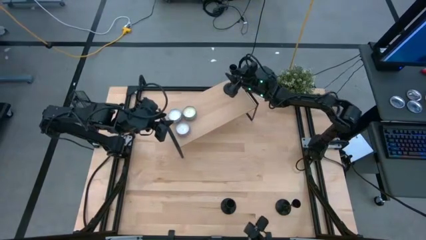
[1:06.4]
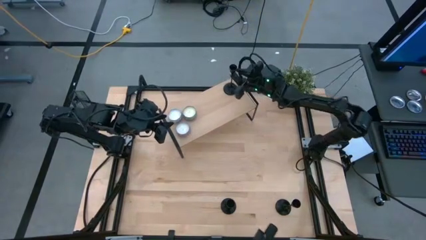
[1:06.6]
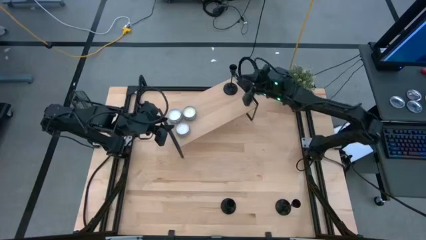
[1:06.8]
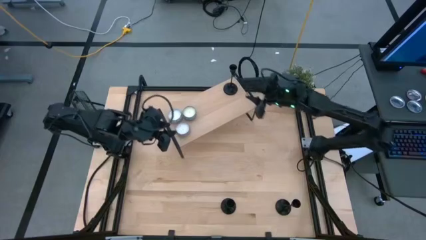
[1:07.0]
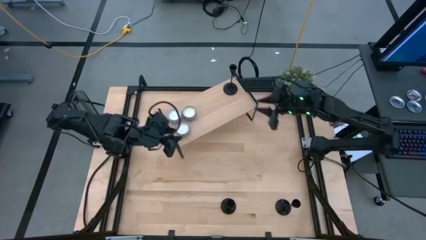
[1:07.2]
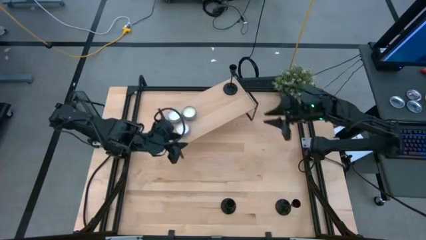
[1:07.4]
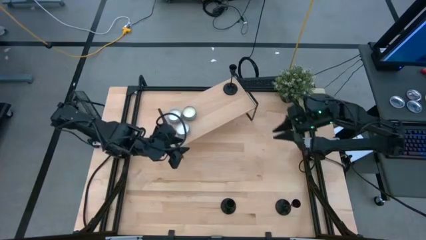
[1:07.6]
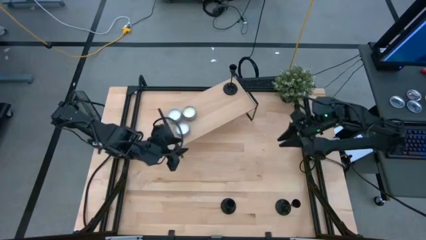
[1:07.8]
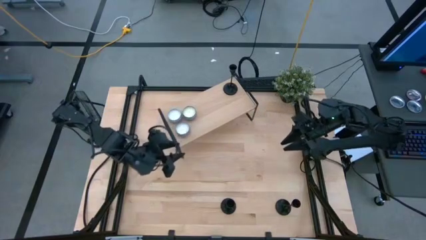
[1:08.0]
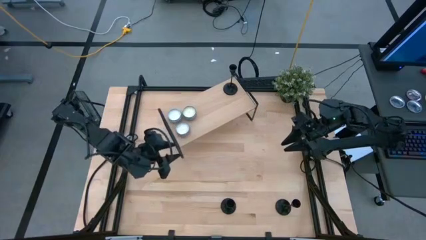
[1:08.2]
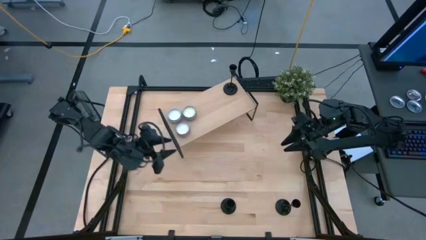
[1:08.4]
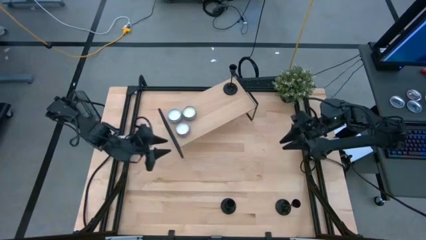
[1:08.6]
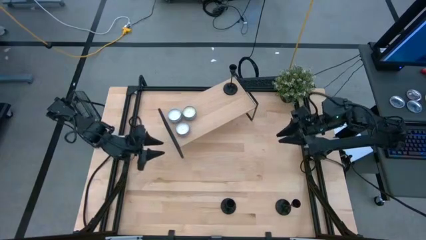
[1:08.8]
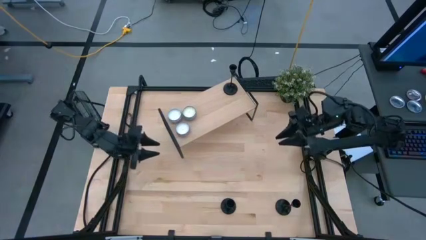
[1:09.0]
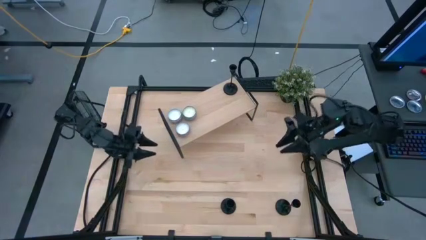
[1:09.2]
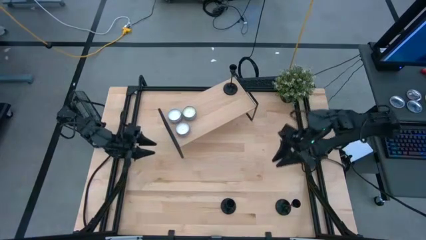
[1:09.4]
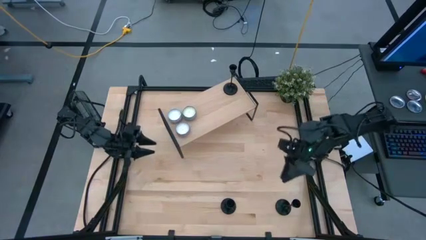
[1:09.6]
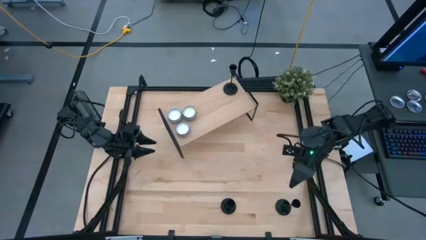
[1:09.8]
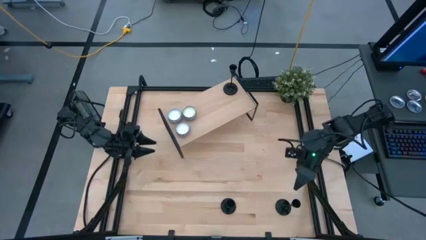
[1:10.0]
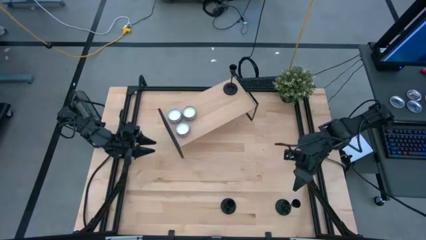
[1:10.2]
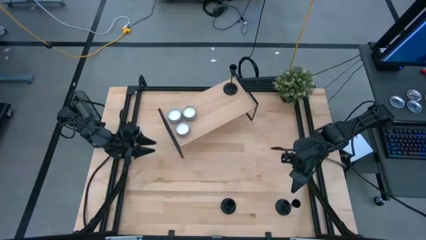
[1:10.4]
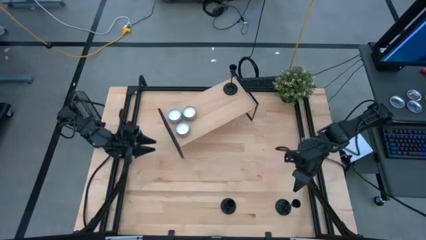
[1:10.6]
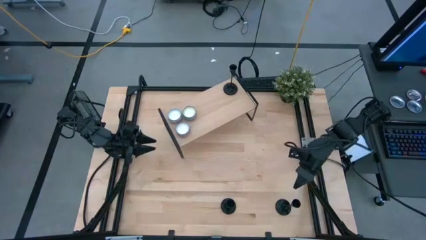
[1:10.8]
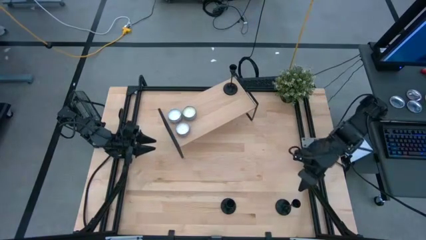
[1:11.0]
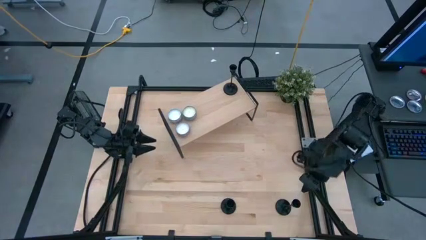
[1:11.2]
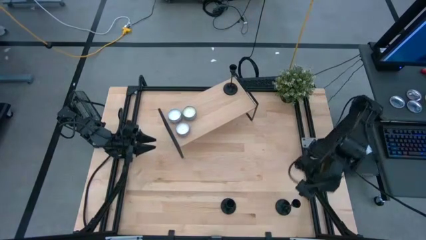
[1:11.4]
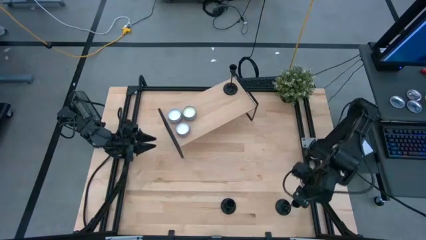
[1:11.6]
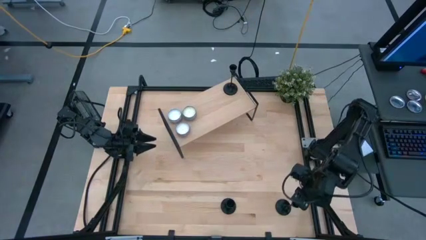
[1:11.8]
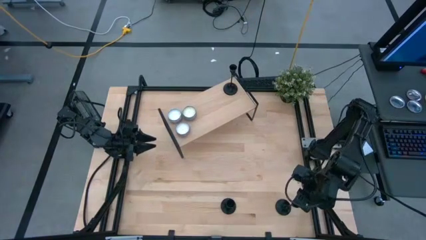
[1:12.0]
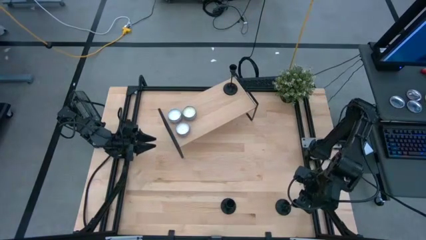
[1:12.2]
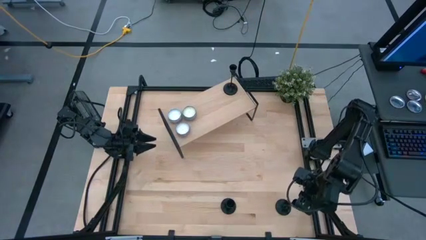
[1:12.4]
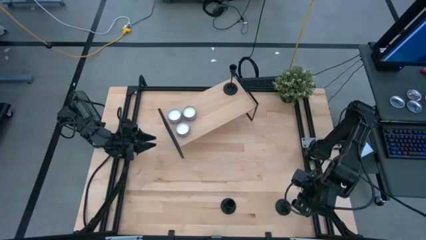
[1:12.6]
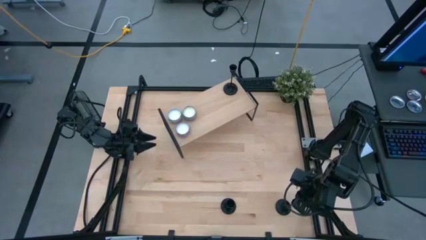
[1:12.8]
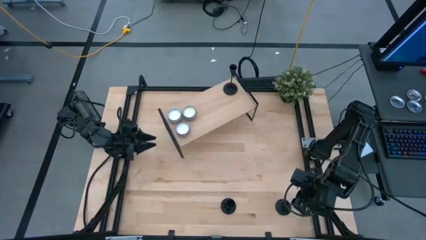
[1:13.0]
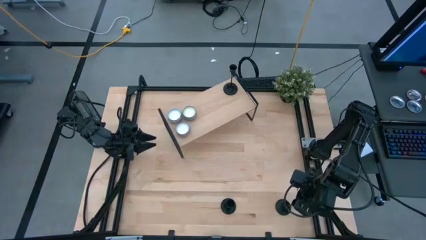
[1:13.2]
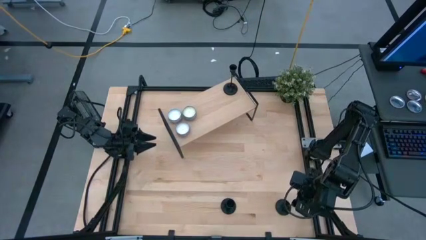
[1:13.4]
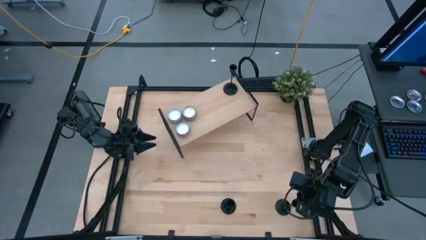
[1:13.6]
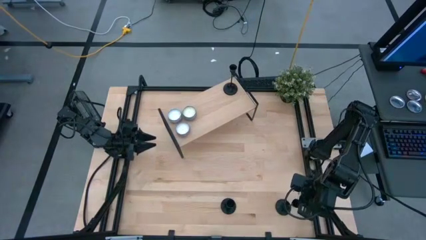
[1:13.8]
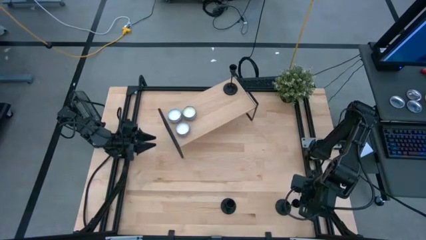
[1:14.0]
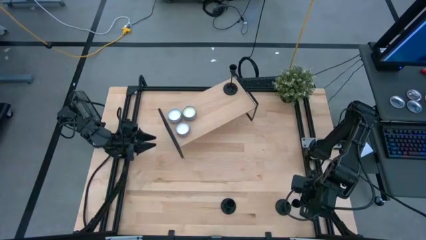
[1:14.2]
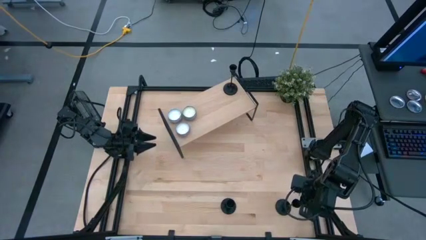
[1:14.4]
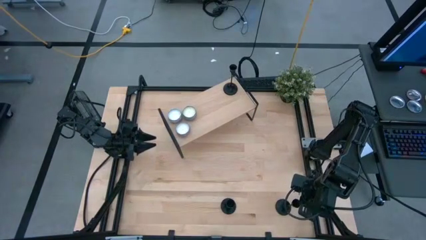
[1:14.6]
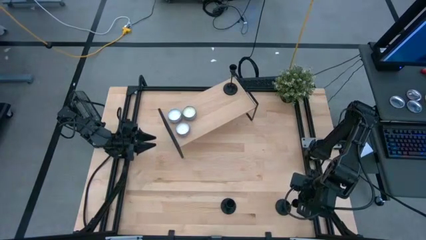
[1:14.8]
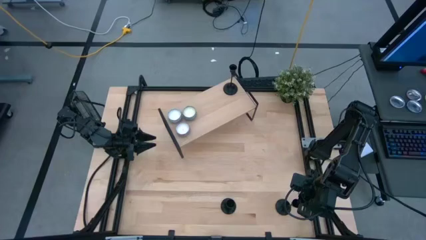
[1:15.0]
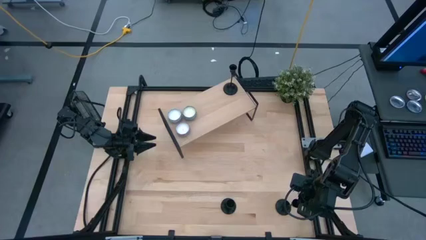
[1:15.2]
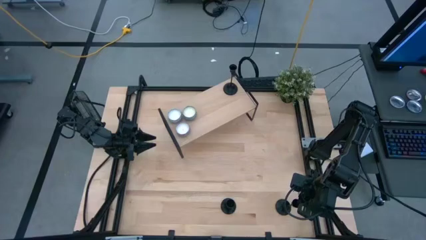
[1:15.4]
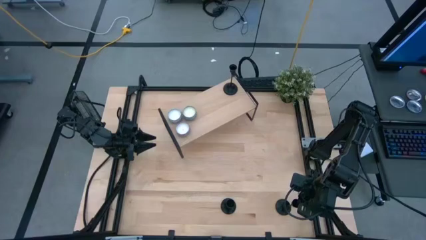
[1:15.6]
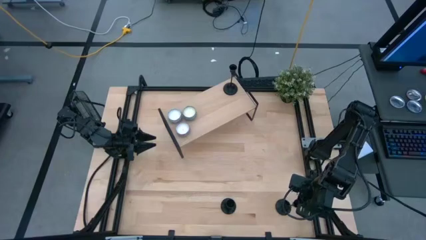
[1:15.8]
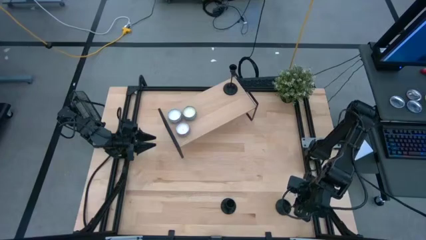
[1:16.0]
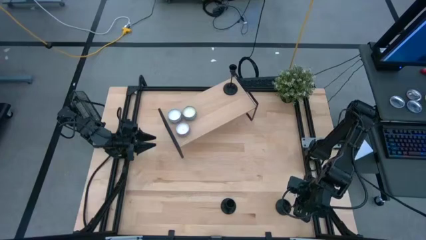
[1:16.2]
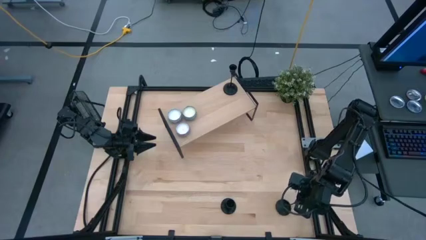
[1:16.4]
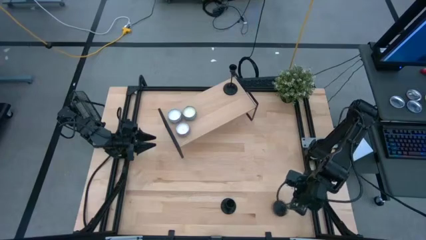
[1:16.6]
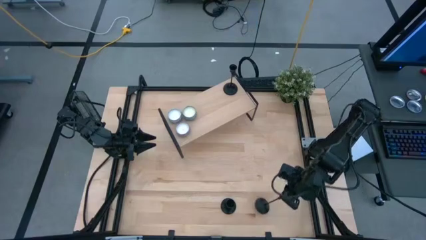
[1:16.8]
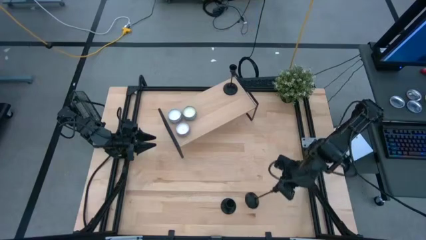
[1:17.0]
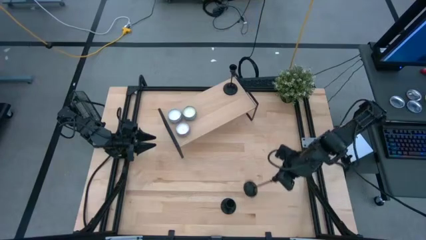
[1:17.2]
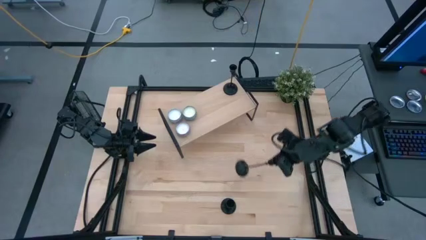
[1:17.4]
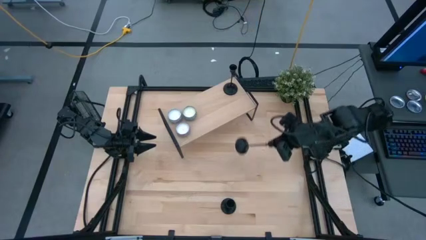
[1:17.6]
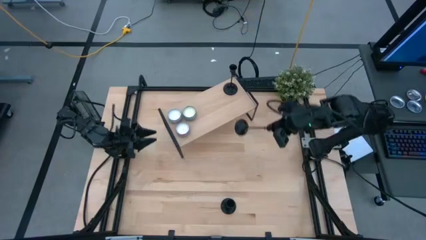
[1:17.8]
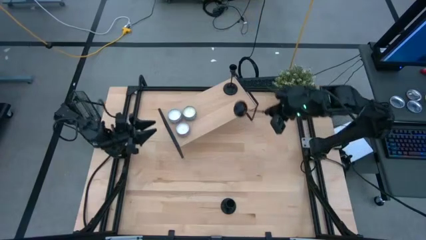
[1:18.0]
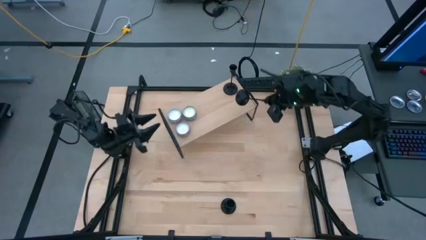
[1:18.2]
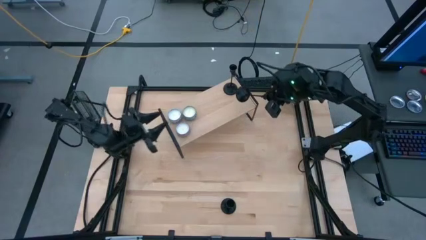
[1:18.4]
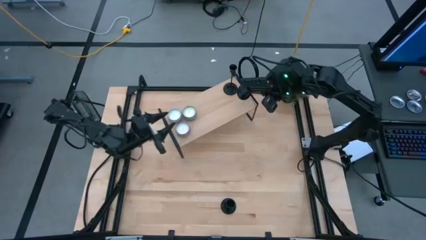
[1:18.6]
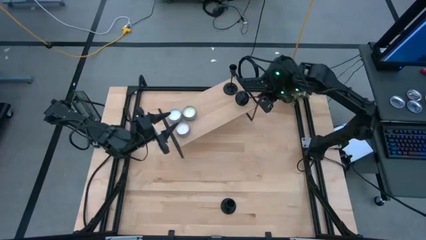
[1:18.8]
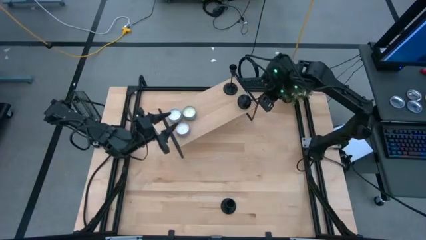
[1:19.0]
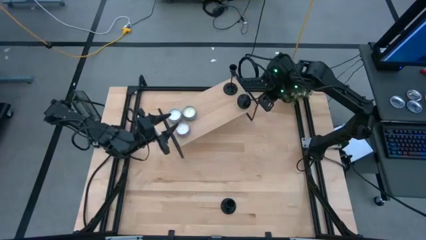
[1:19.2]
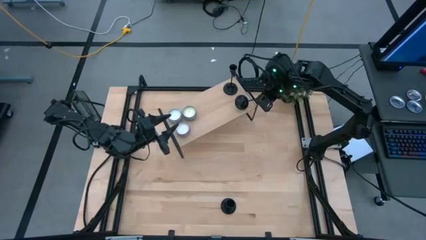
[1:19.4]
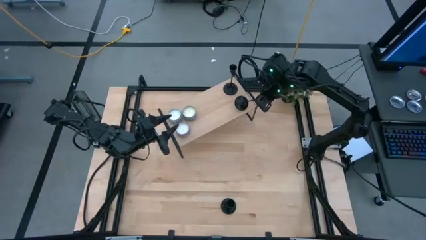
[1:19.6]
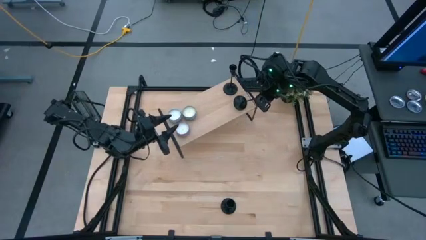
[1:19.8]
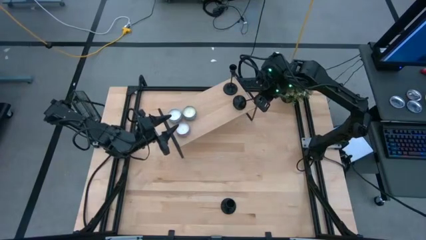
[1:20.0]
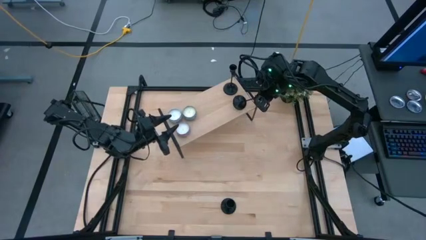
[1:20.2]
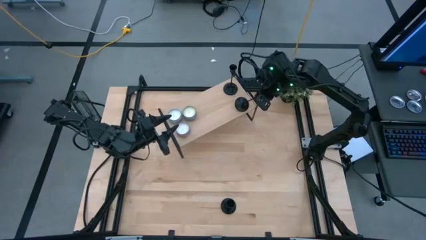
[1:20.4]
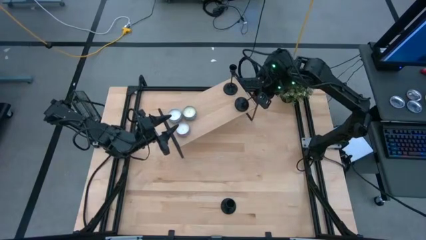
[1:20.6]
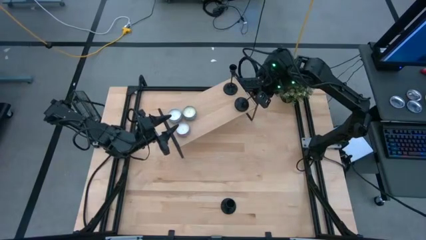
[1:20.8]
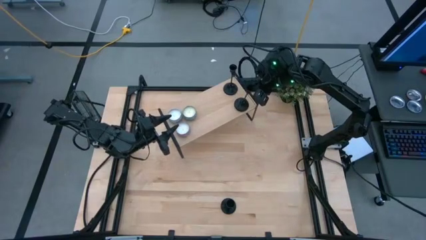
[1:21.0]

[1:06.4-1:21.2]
Task: Pick & Place candle stick holders
Put the right black candle holder on the shelf

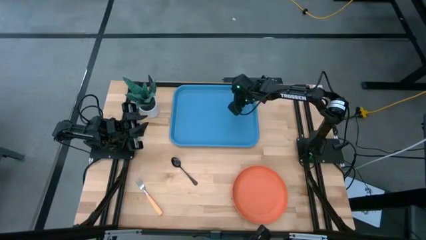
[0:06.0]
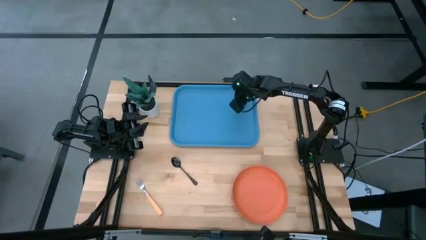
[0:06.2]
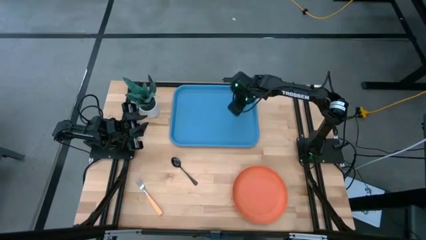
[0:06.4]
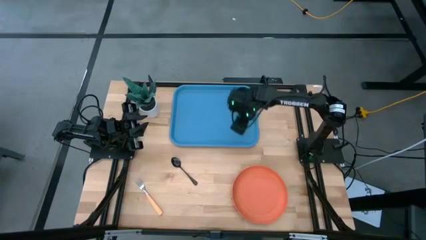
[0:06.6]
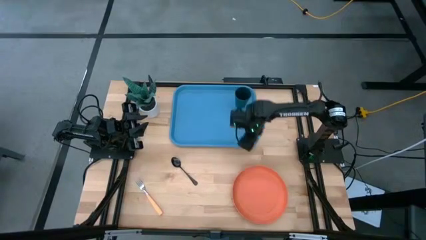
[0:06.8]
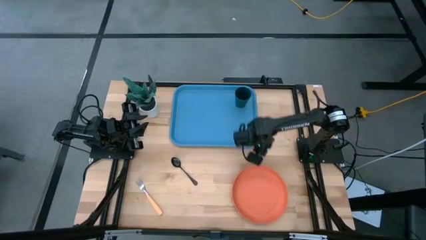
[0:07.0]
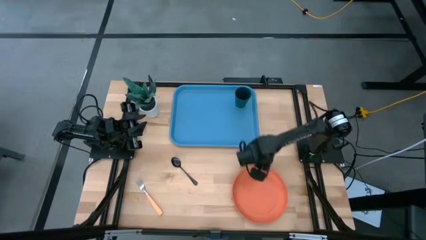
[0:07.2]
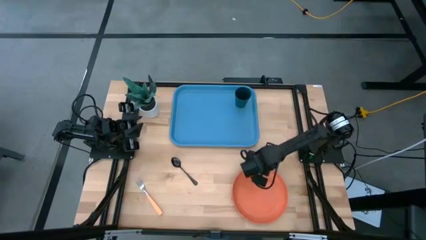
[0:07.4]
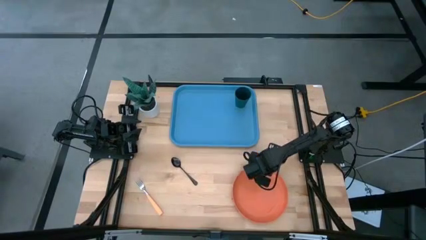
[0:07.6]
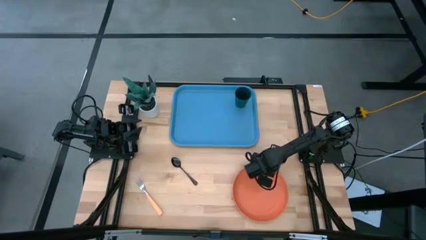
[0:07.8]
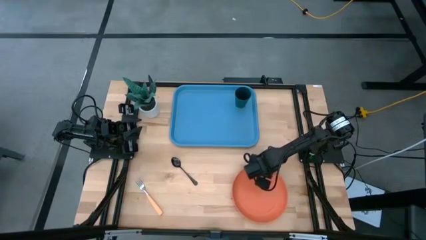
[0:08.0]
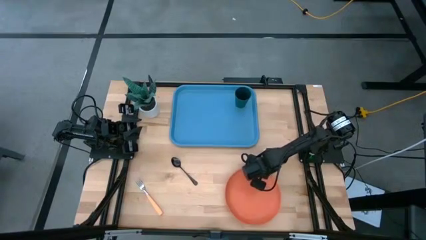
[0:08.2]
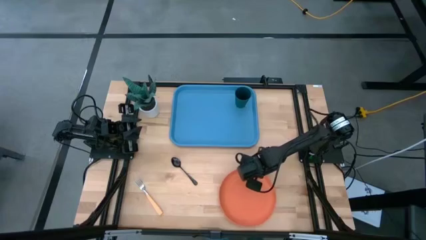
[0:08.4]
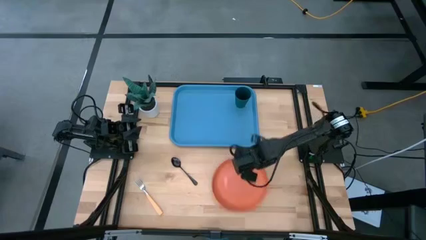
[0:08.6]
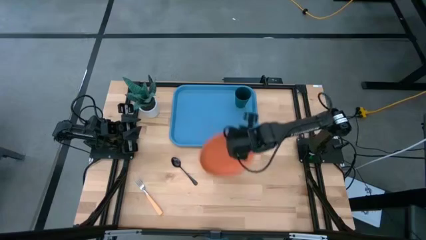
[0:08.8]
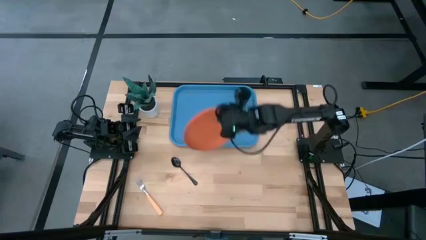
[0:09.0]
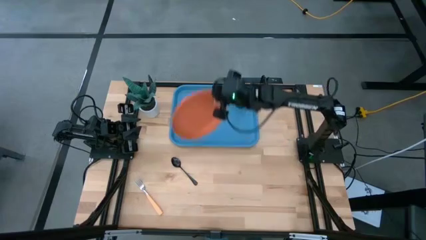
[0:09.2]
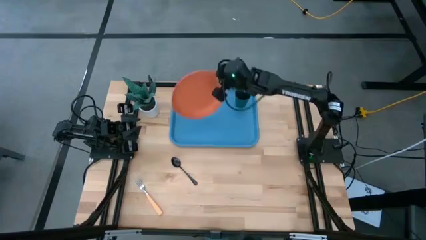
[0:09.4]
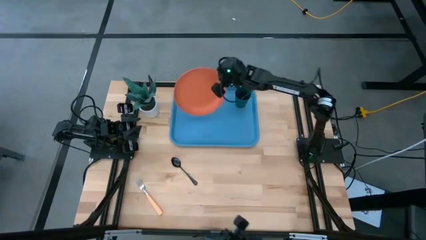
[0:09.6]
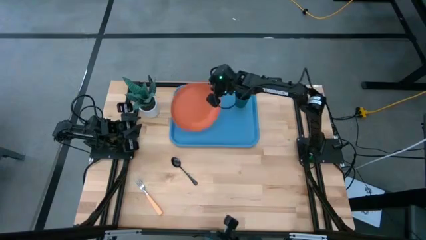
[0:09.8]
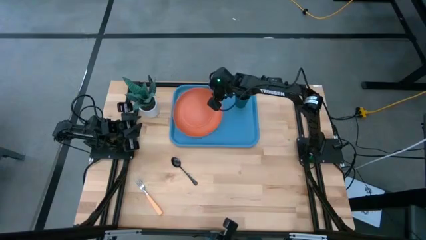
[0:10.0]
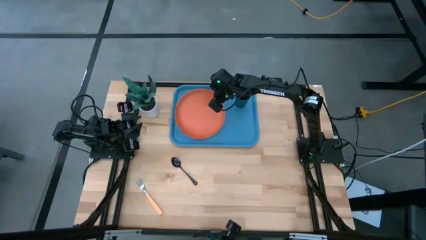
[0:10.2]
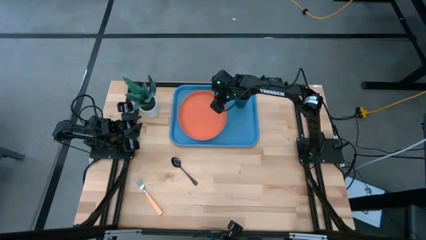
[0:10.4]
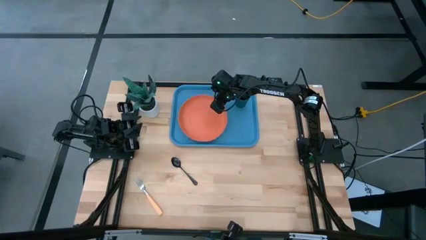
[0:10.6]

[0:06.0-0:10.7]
Task: Pick and place plate/cup/fork/spoon on tray
Put the orange plate on the tray
